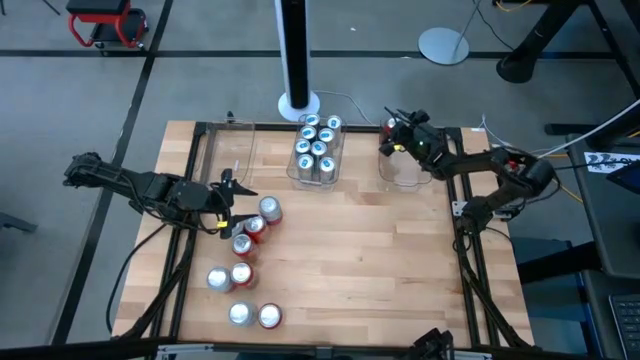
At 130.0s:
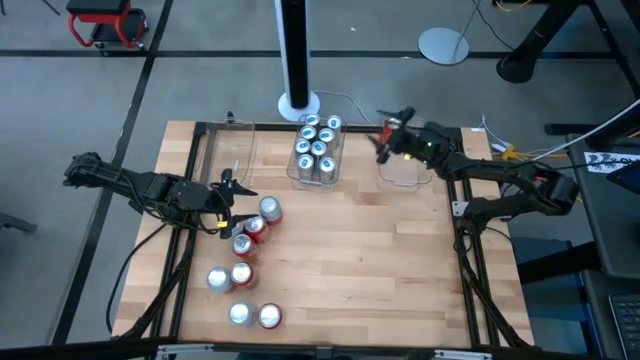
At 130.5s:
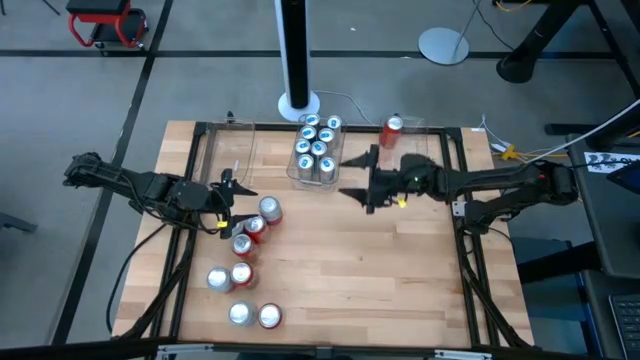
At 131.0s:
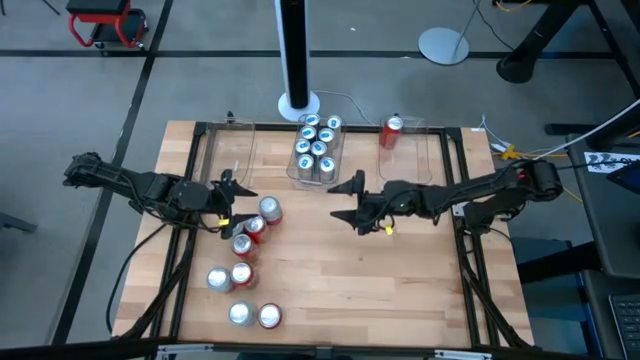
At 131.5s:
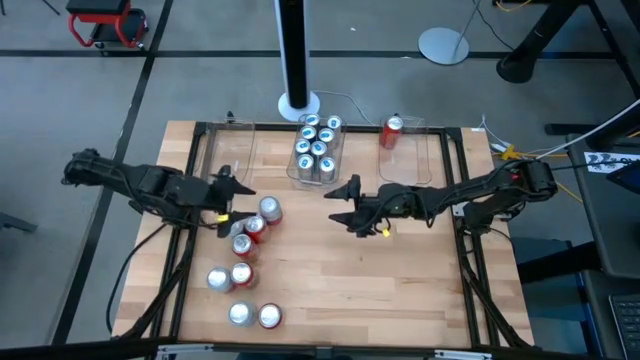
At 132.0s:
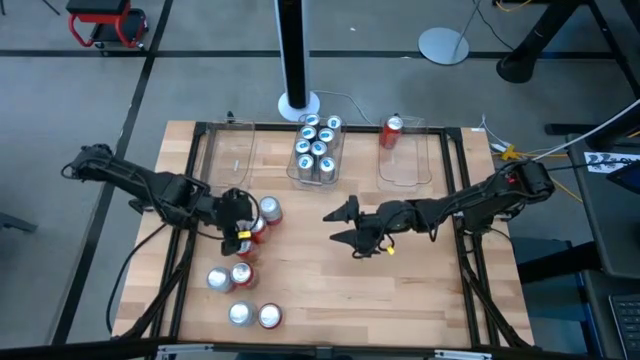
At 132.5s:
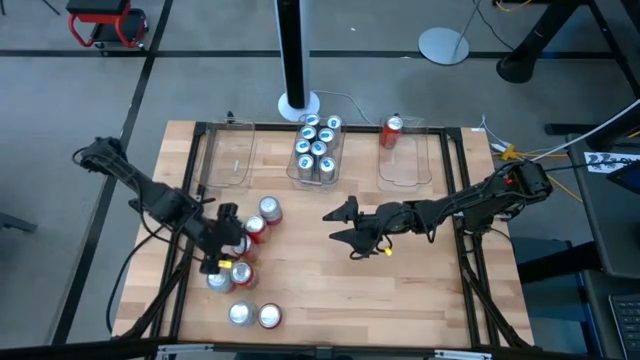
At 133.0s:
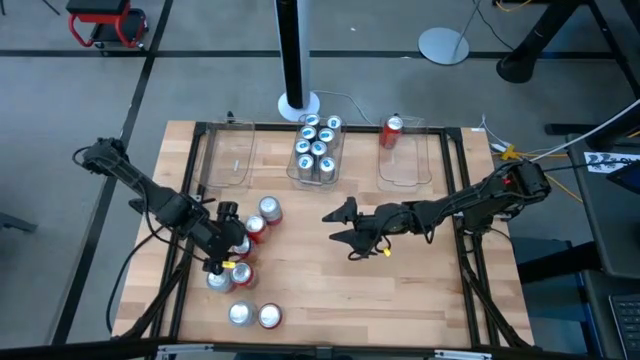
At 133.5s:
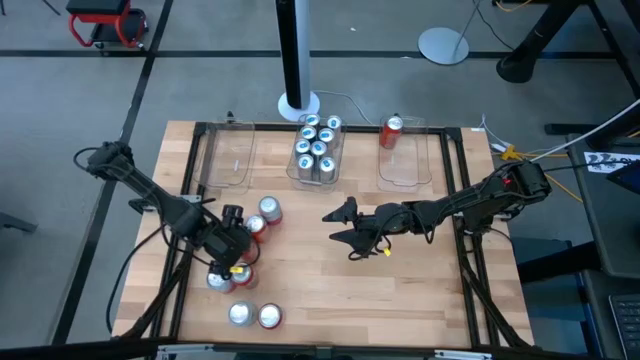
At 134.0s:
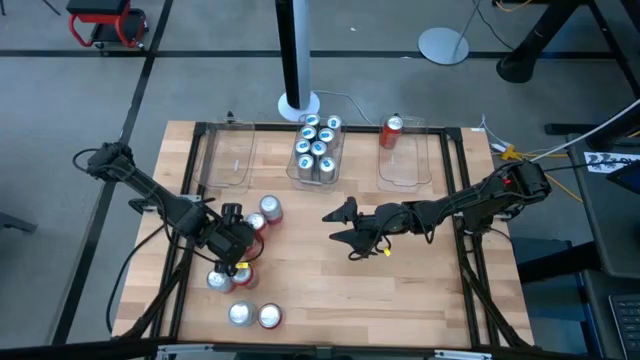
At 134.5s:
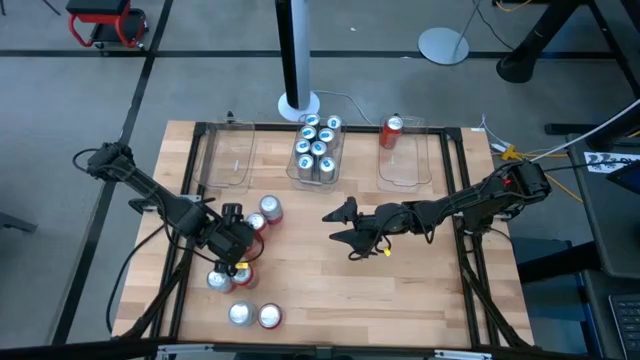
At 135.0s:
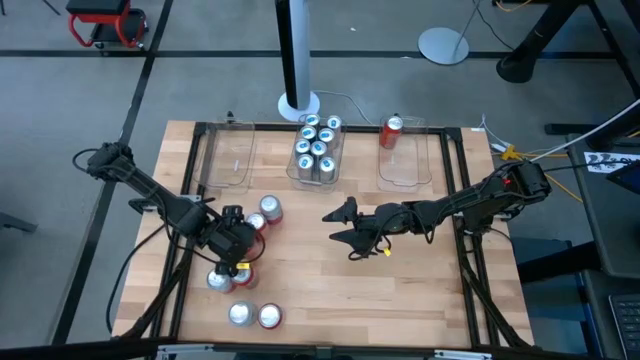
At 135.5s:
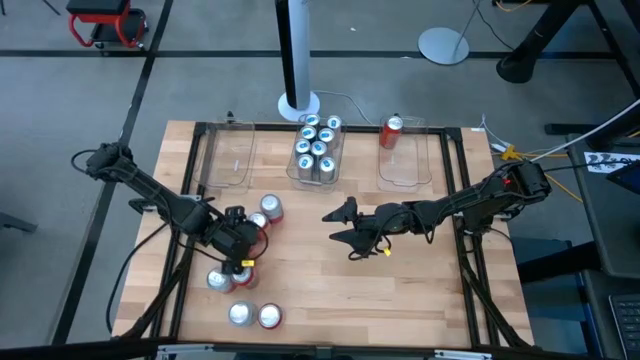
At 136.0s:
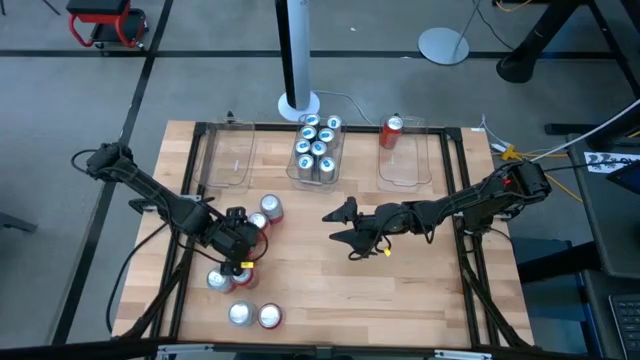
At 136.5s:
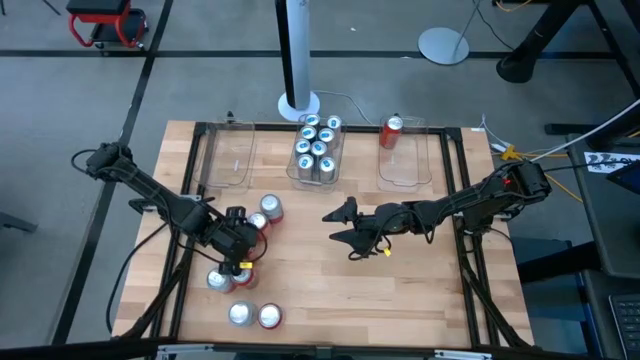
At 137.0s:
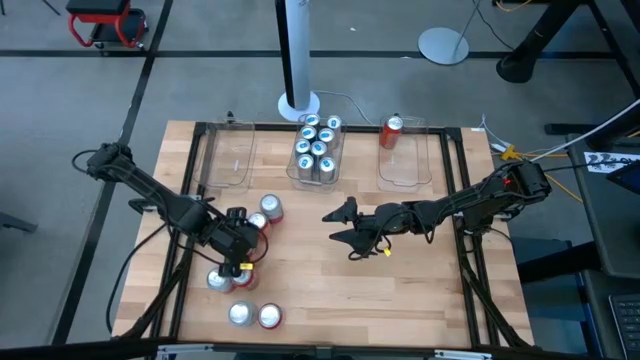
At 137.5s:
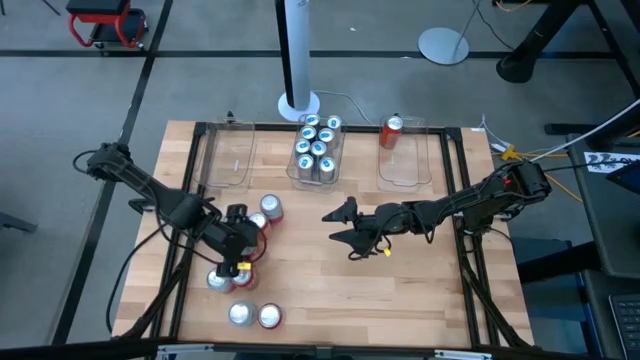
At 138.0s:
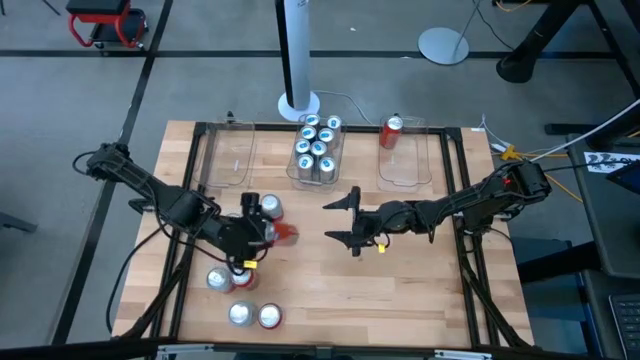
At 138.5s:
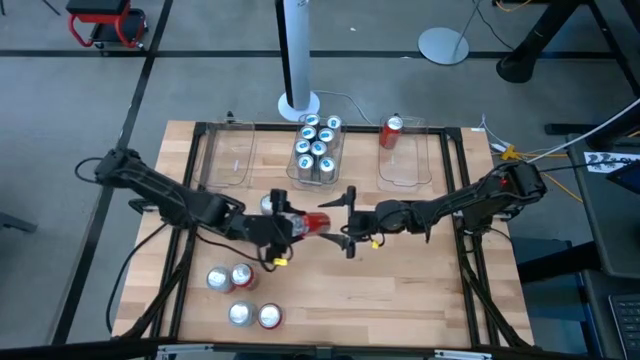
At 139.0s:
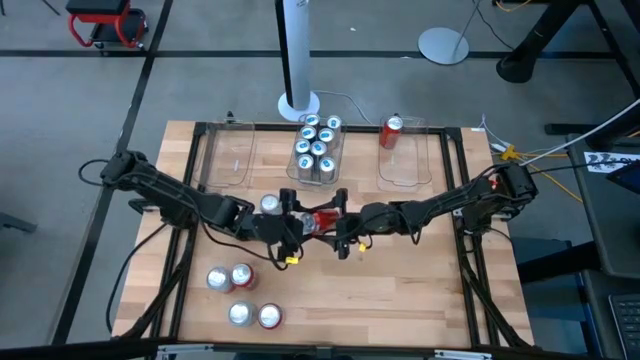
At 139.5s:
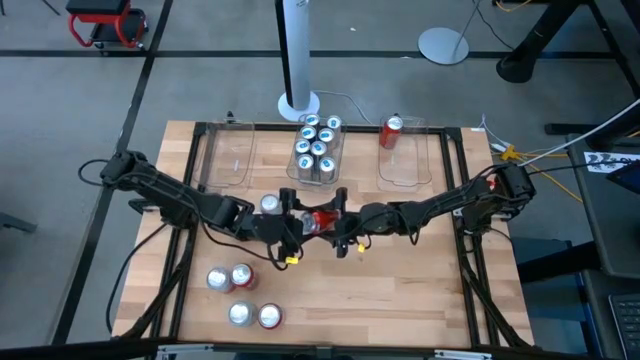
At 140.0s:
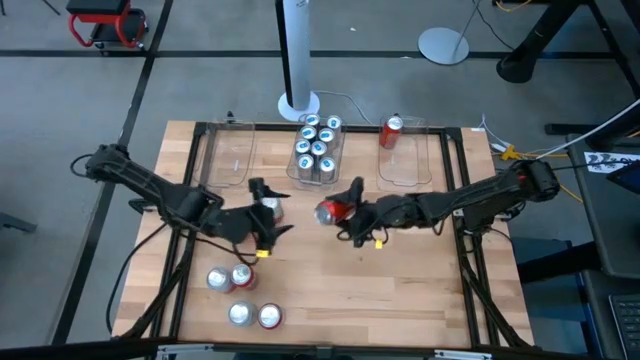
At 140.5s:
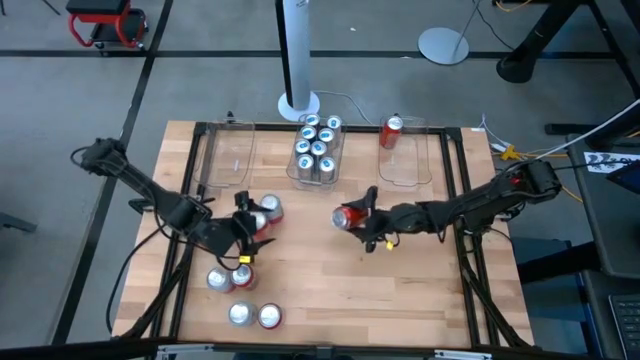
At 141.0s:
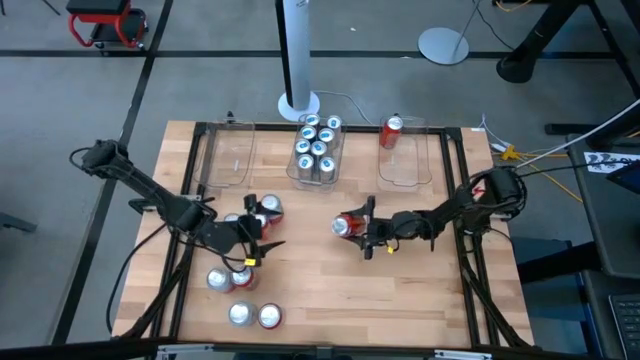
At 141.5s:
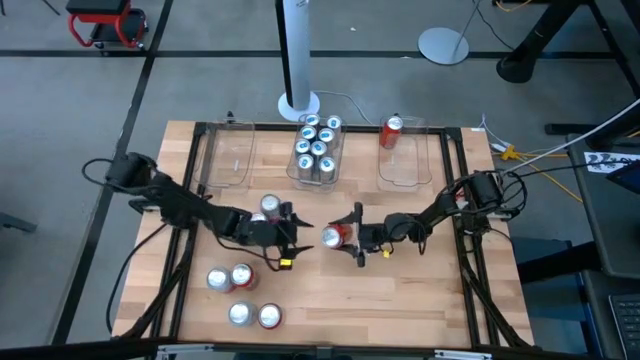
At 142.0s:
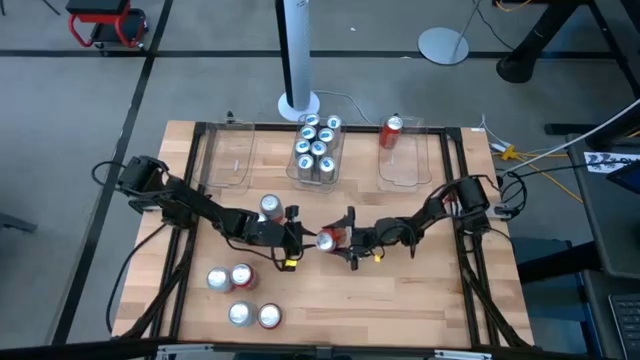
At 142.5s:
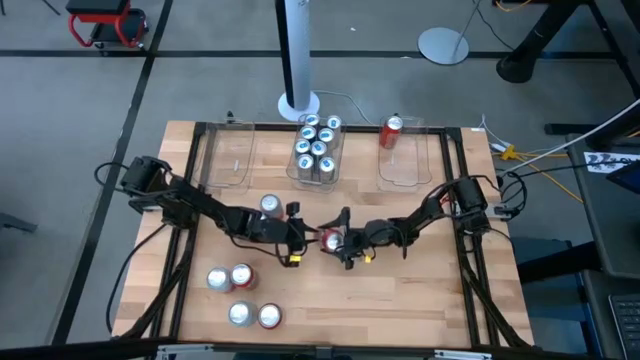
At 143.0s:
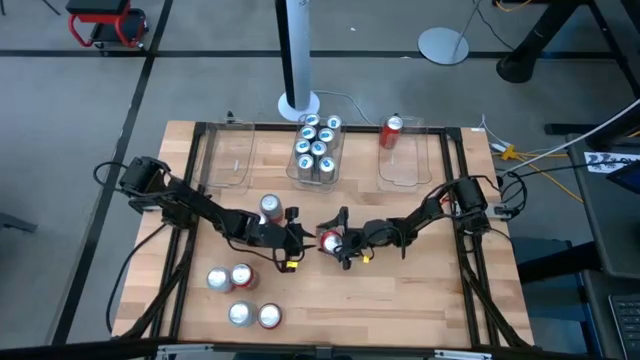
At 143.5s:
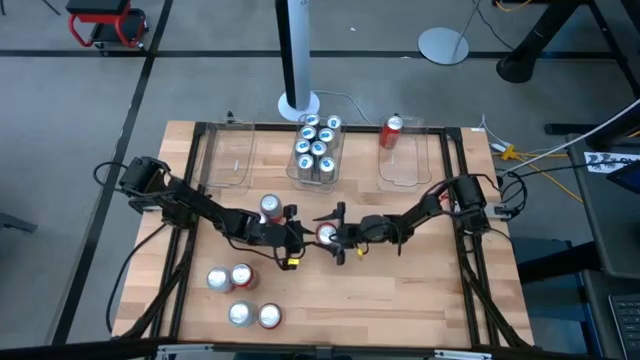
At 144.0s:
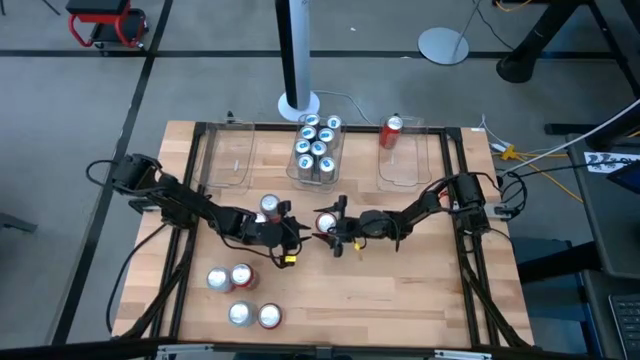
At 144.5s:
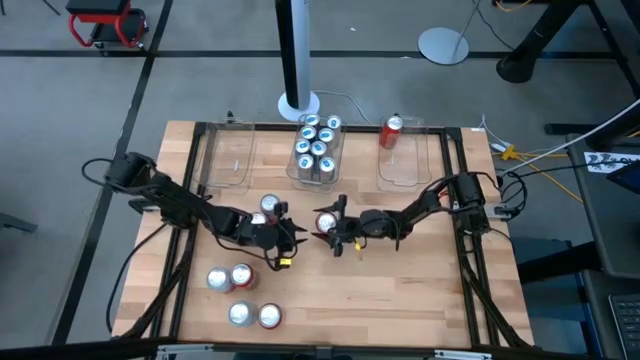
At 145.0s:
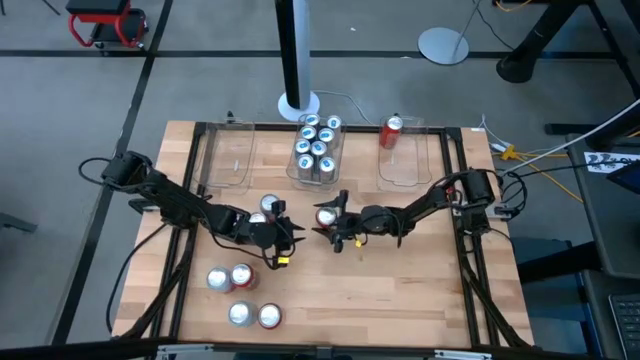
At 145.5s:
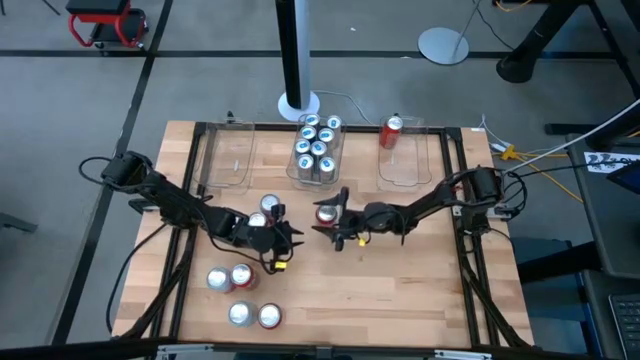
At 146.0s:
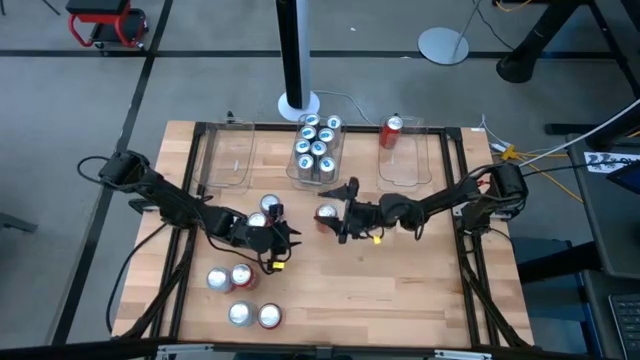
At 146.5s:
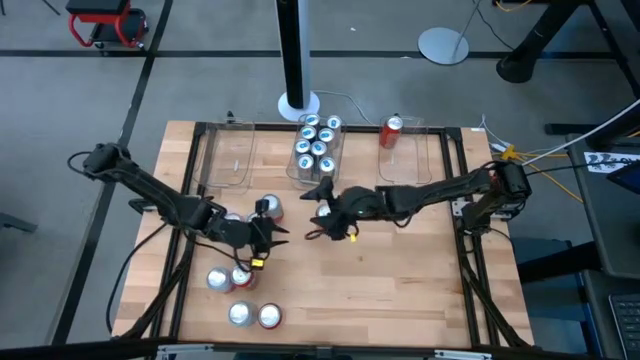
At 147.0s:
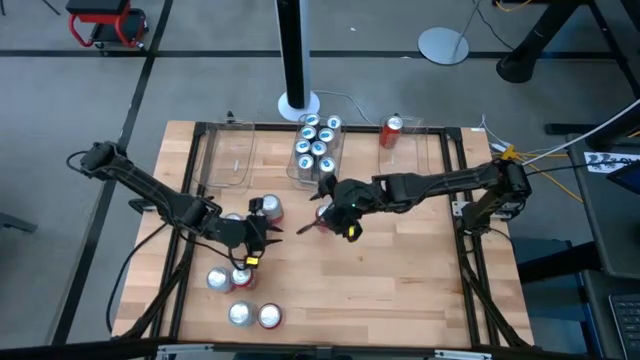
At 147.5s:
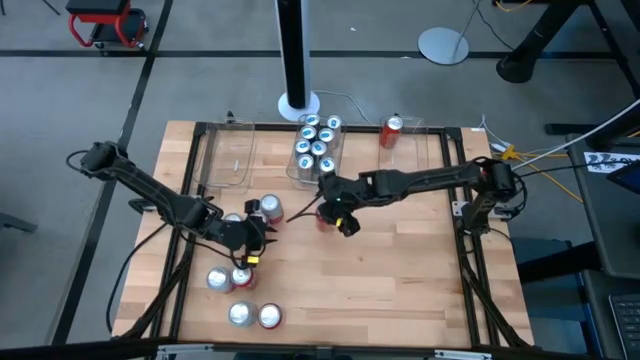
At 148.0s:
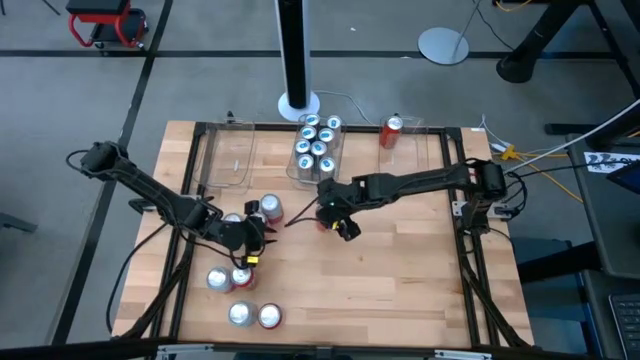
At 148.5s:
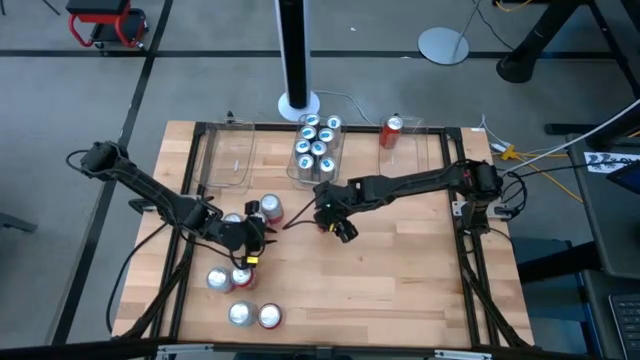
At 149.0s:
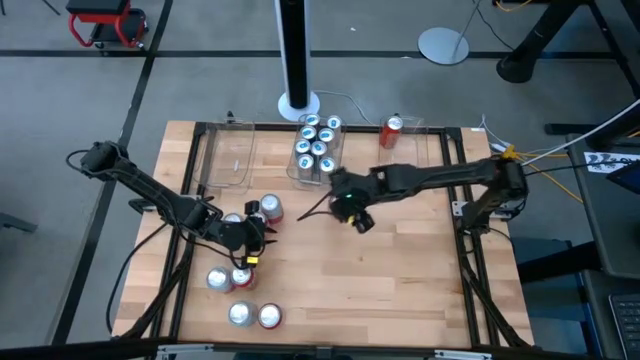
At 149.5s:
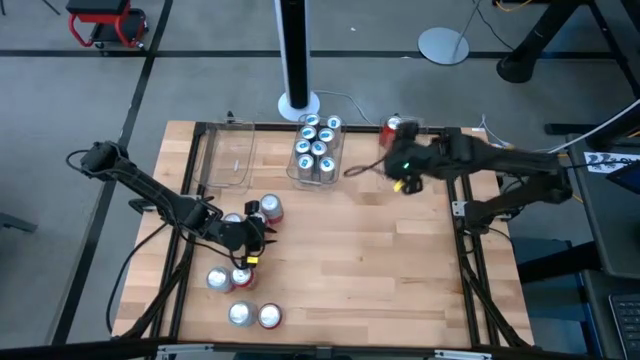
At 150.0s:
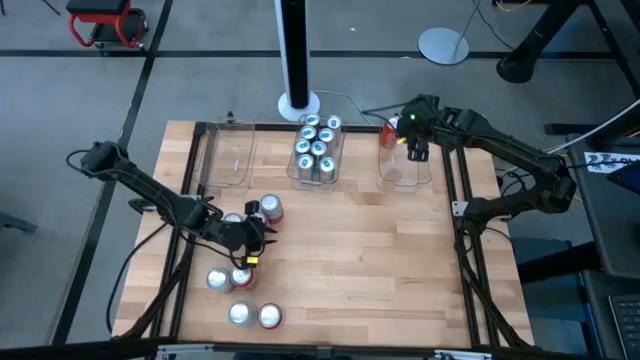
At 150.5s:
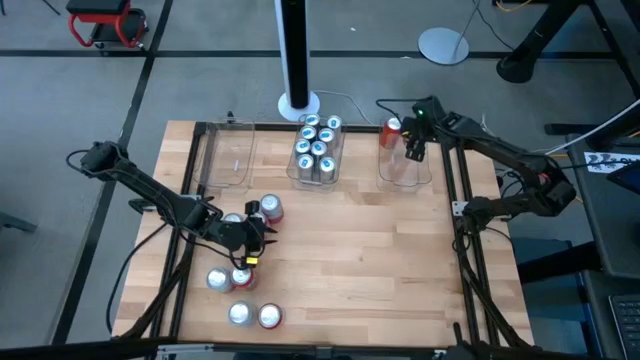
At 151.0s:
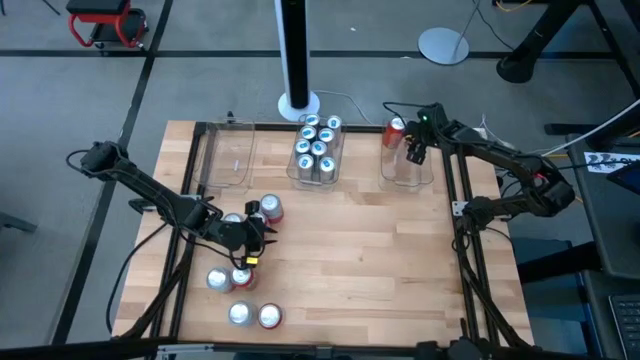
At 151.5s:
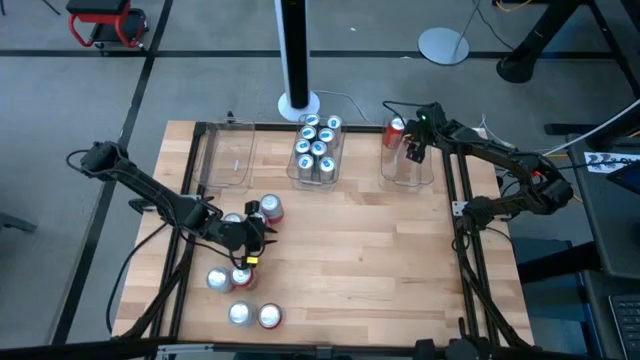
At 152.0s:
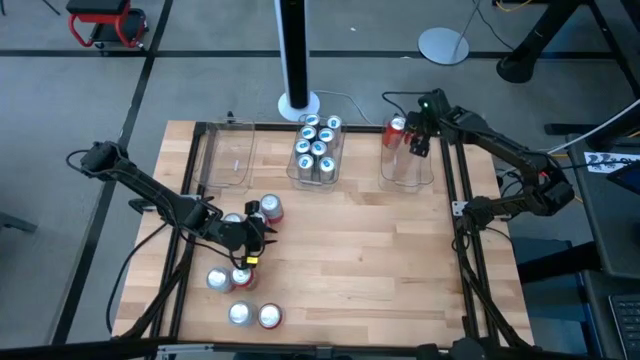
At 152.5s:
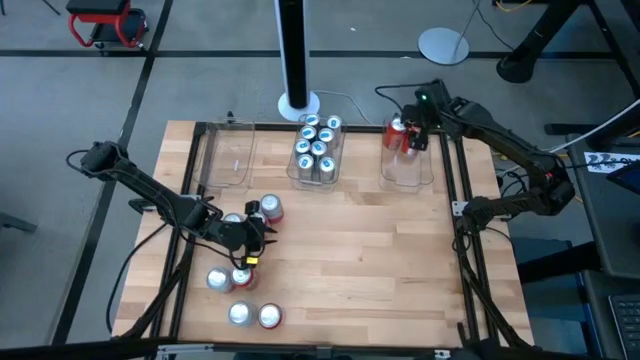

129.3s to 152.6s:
Task: Sort soda cans
Put the orange soda can into the right transparent bin
